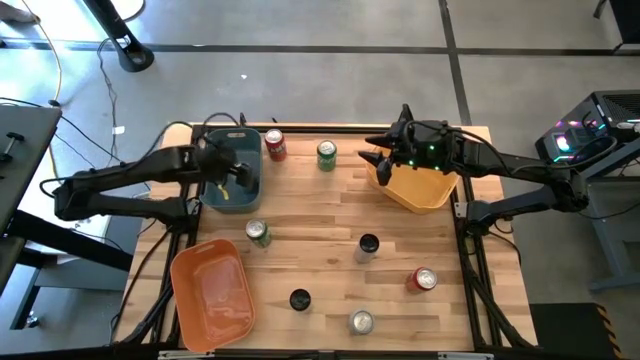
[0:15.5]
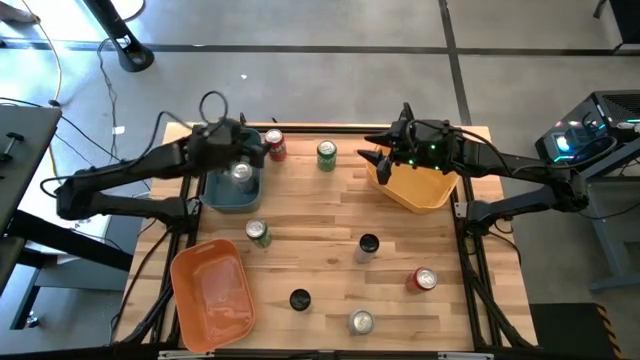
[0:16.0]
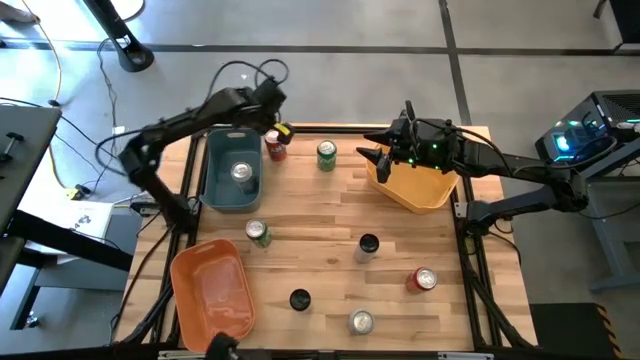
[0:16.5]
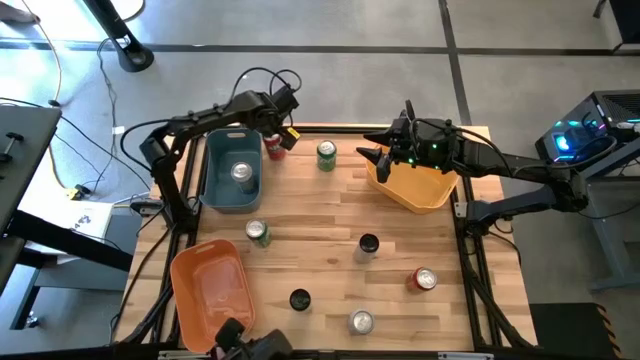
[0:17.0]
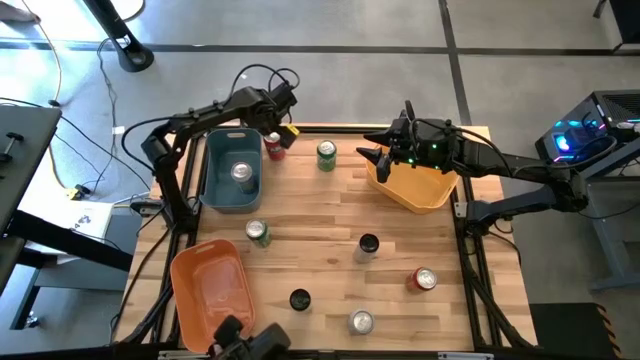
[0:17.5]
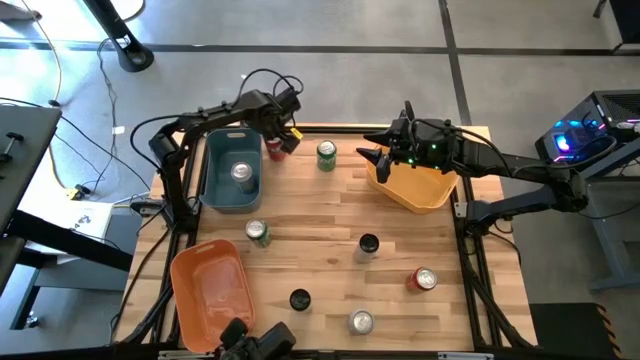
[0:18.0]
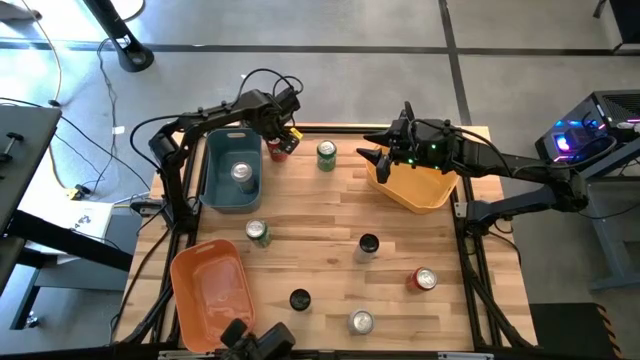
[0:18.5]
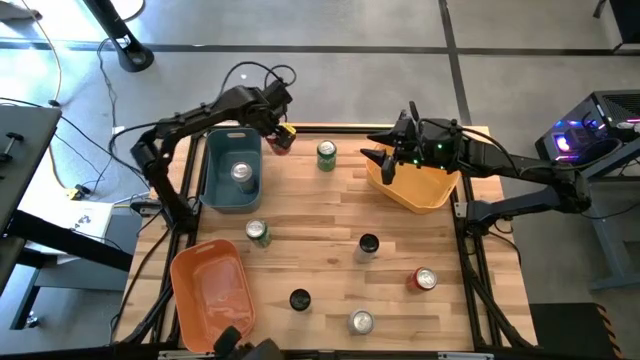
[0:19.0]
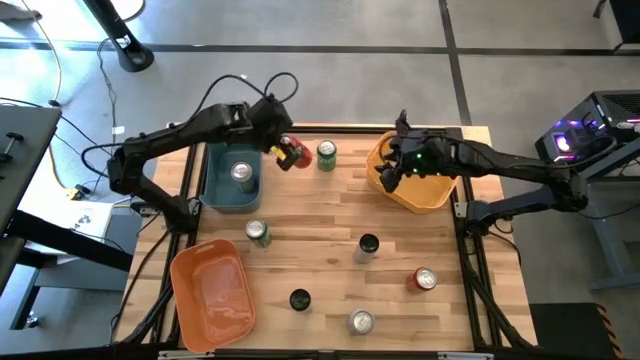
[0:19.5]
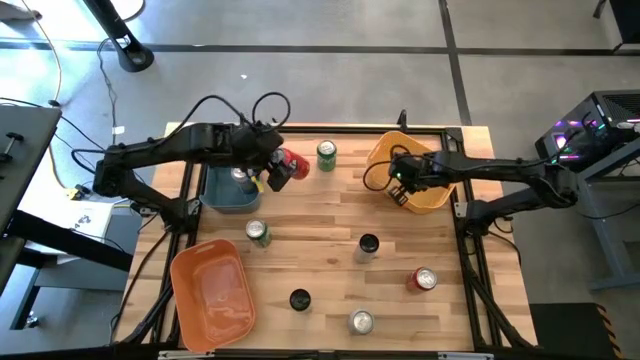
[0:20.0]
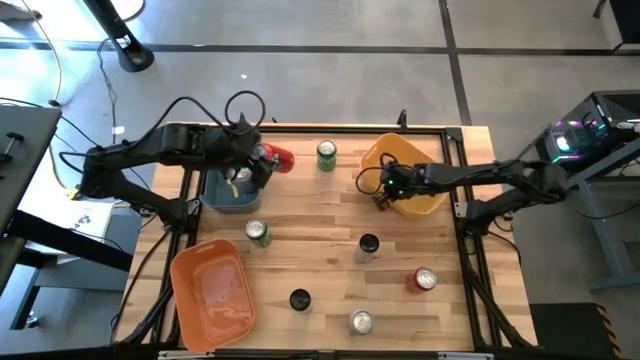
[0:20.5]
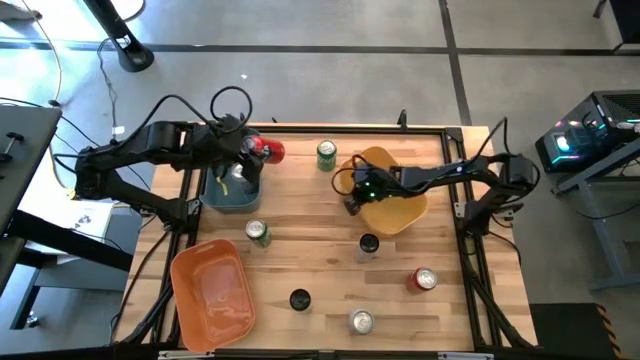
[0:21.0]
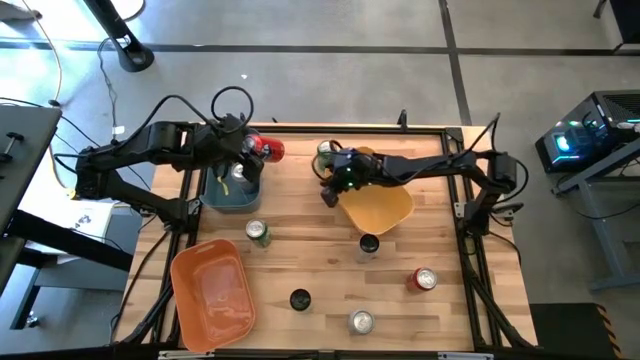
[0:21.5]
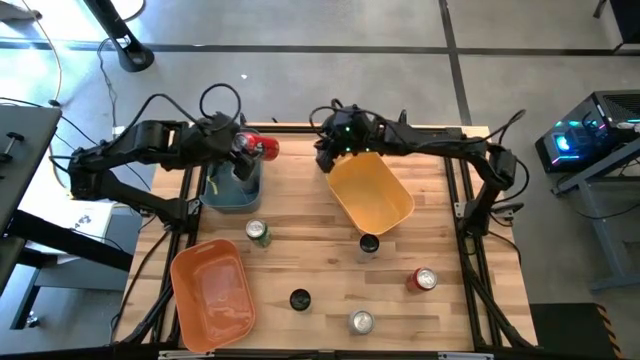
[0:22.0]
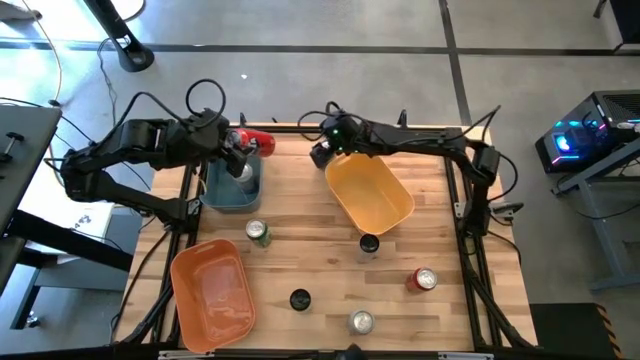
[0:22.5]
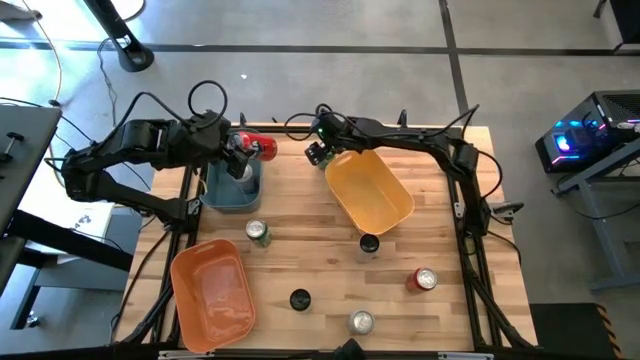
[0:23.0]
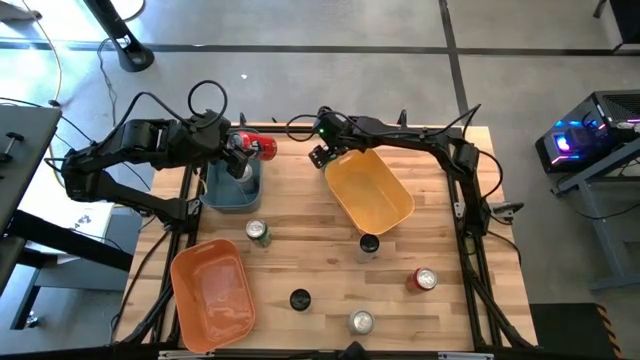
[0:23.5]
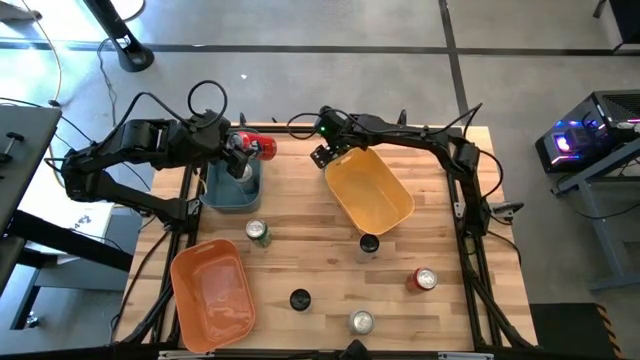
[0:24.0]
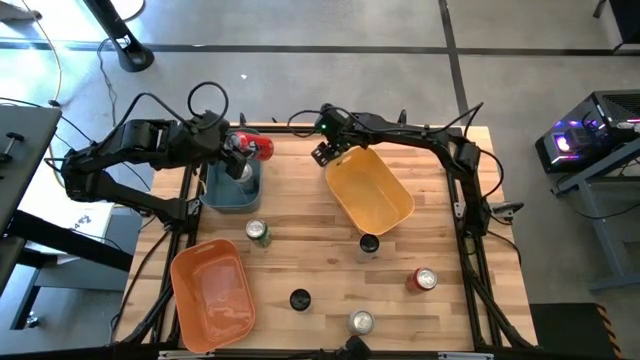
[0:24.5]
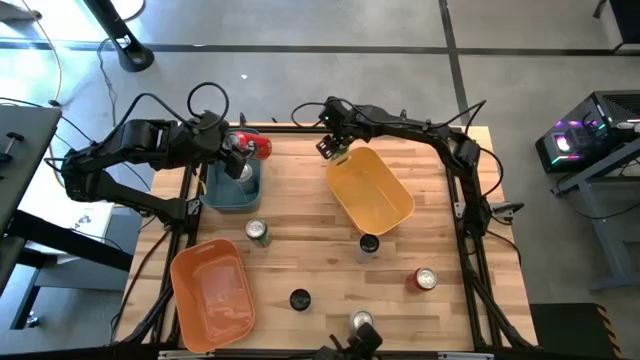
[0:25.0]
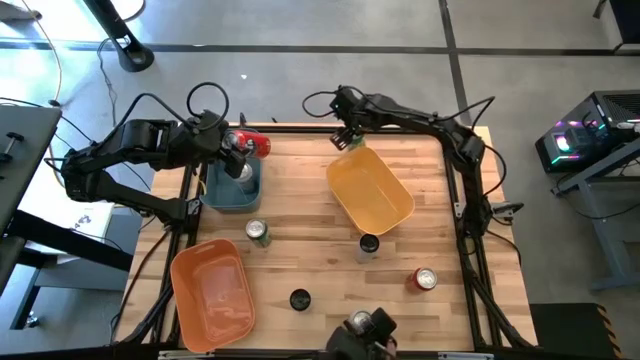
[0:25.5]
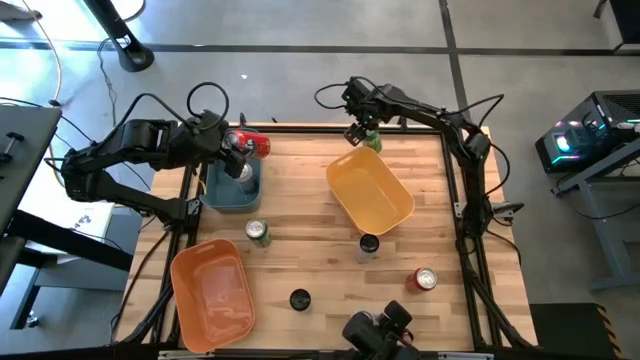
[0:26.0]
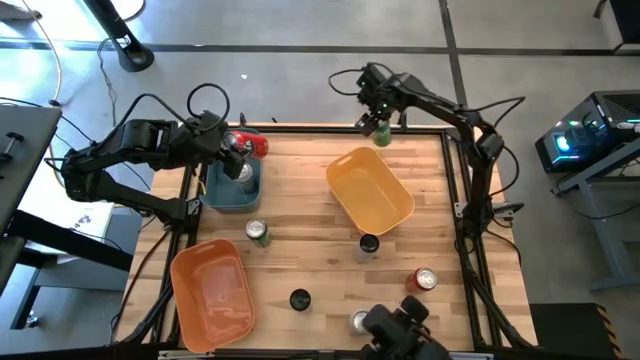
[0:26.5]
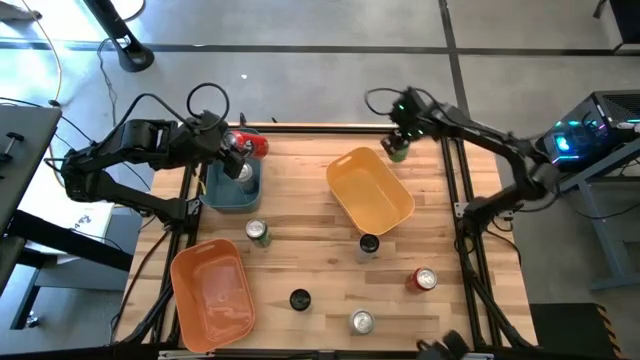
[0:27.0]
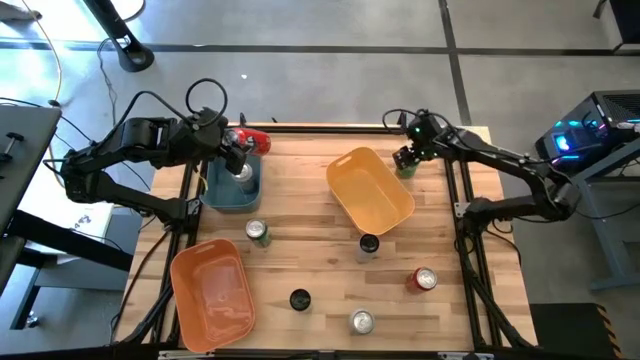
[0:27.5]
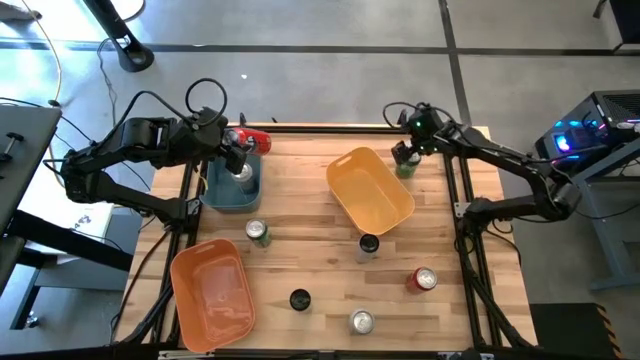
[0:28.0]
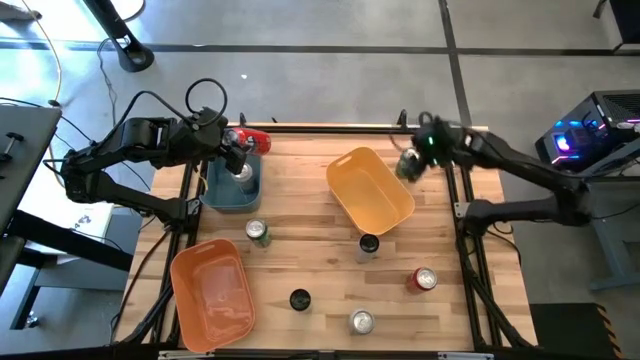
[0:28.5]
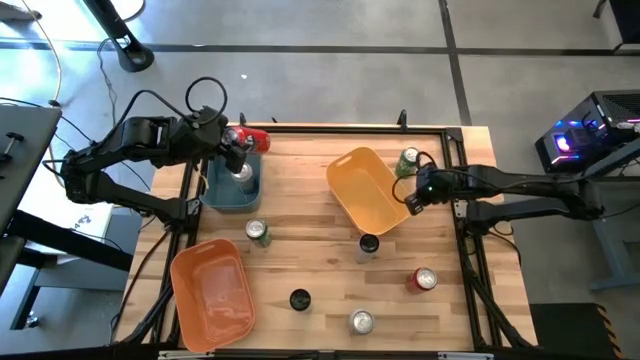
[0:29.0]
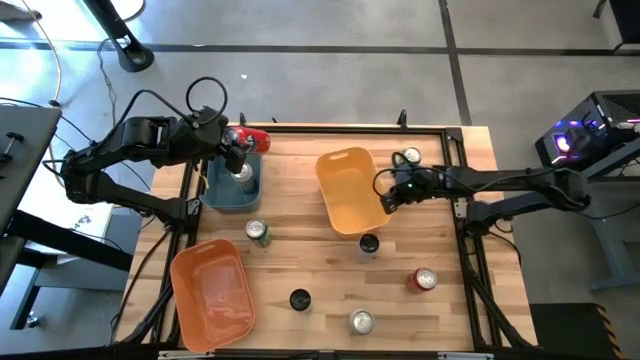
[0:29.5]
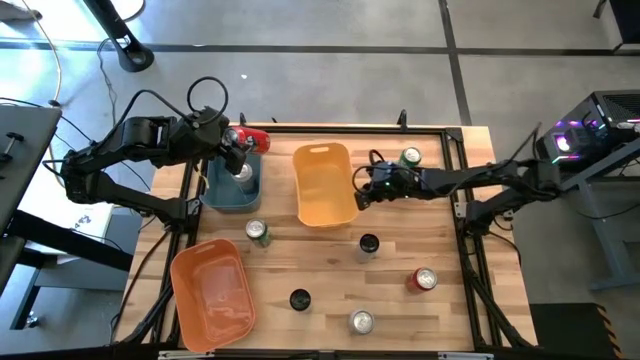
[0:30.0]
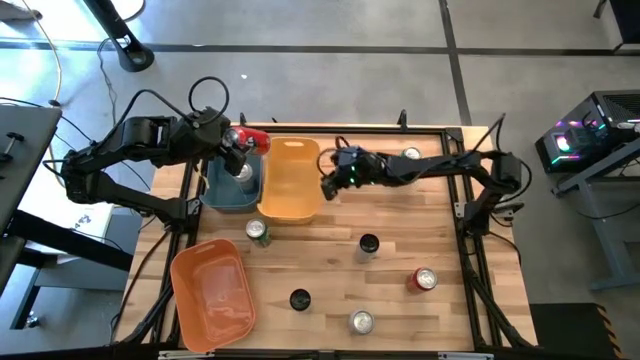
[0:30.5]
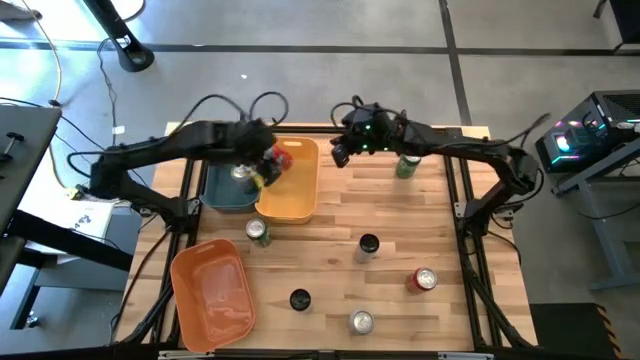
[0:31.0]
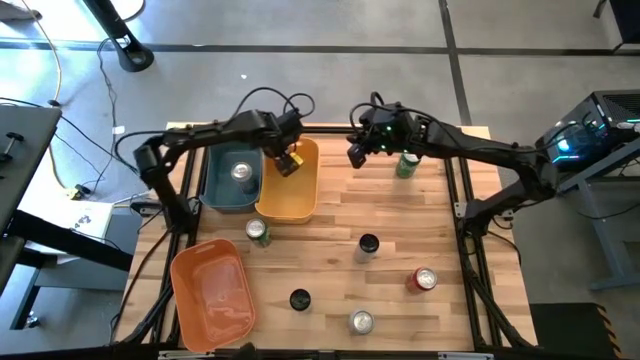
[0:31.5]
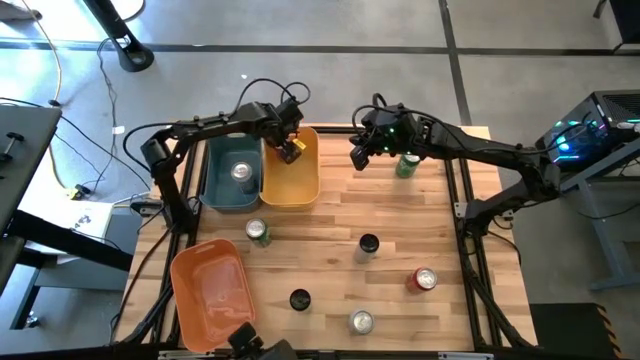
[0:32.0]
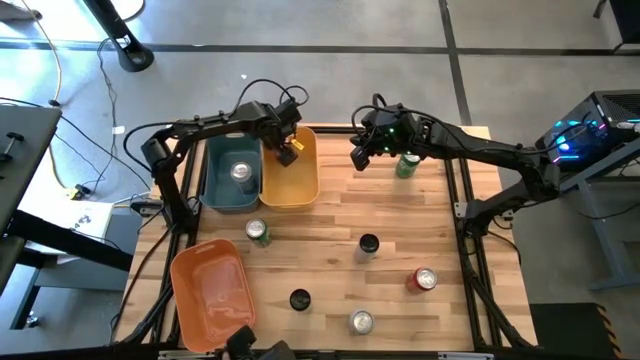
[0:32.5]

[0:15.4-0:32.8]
Task: Sort soda cans
Put the top orange soda can into the yellow bin
